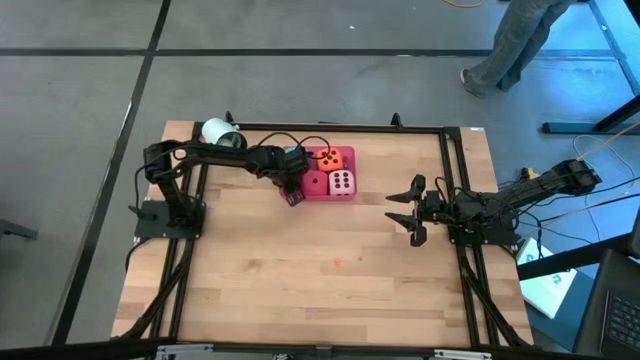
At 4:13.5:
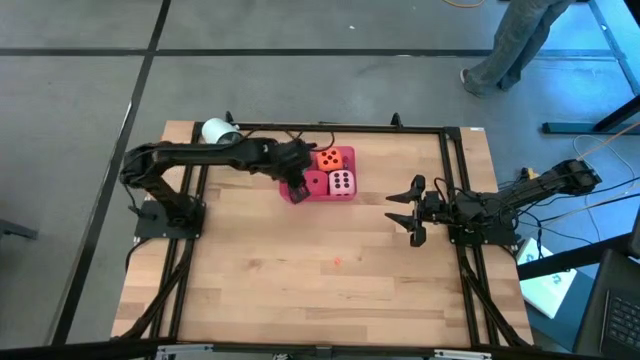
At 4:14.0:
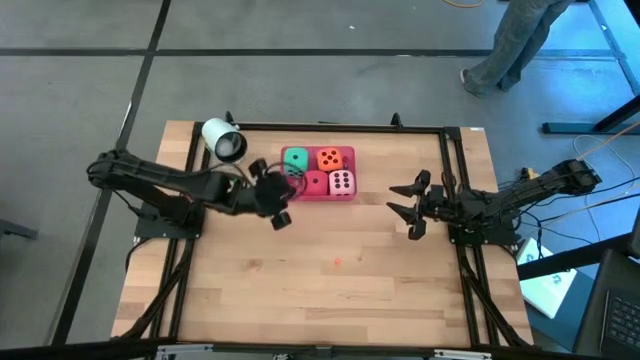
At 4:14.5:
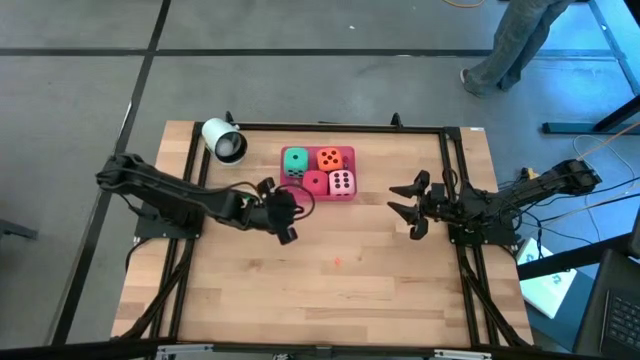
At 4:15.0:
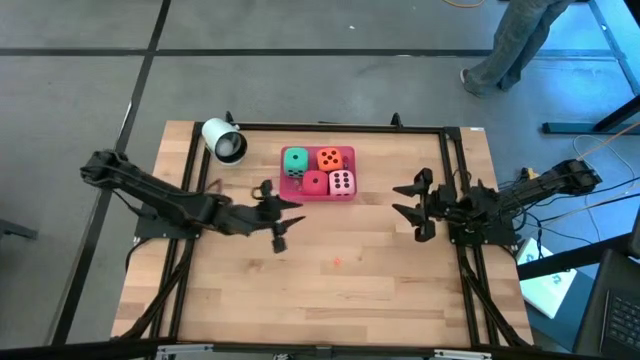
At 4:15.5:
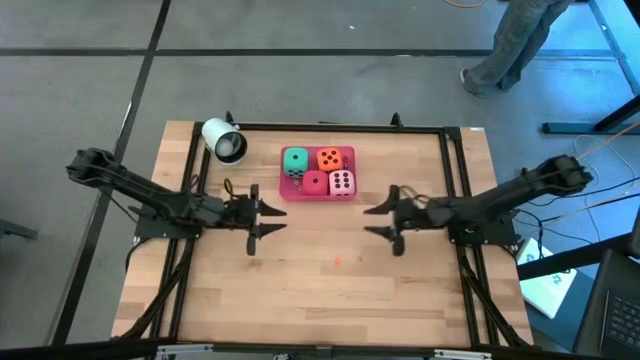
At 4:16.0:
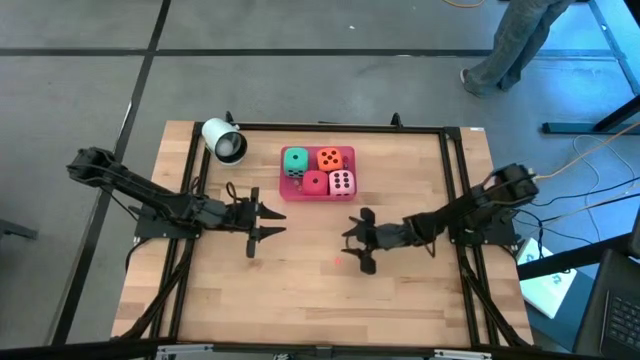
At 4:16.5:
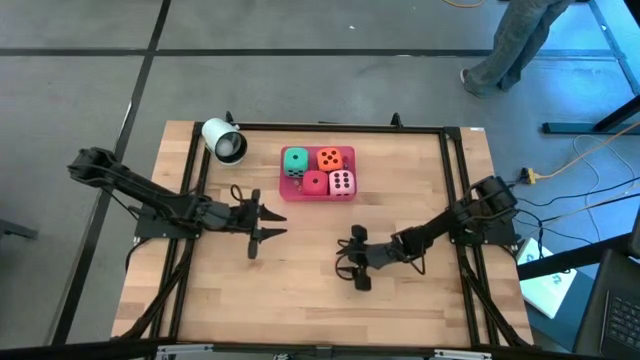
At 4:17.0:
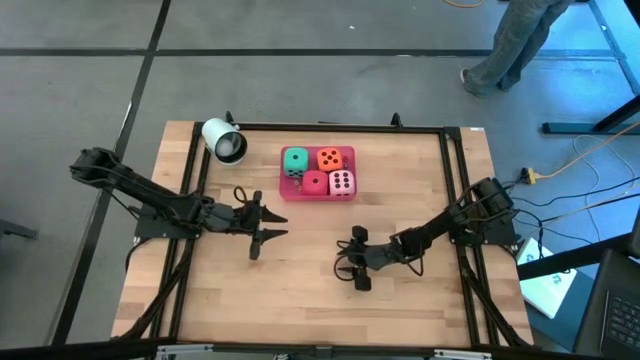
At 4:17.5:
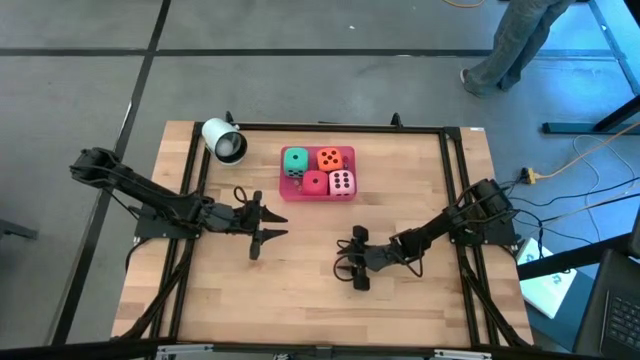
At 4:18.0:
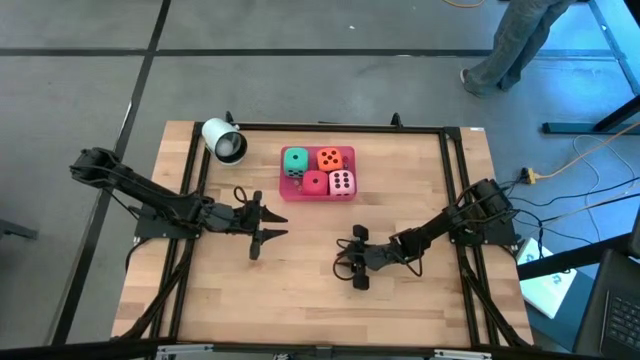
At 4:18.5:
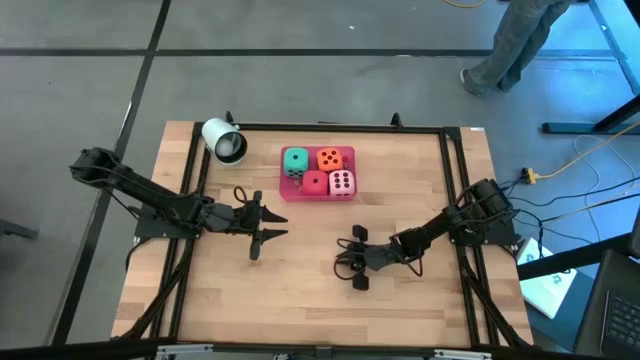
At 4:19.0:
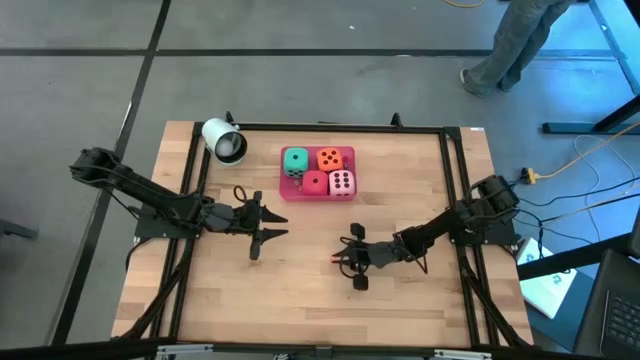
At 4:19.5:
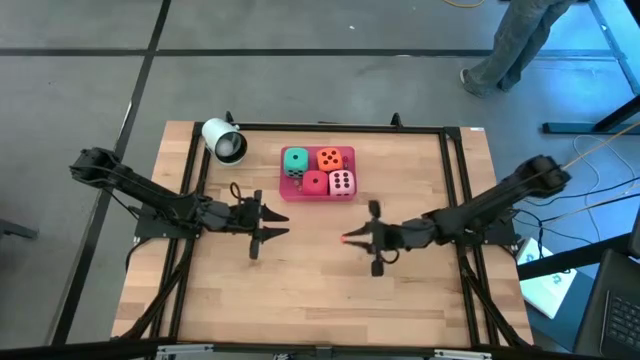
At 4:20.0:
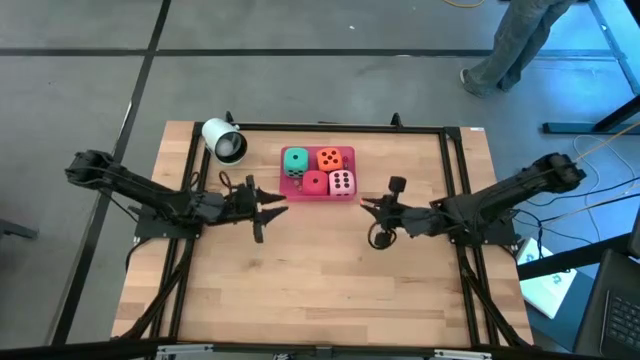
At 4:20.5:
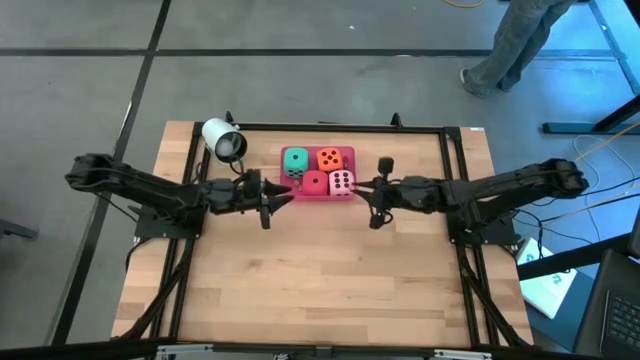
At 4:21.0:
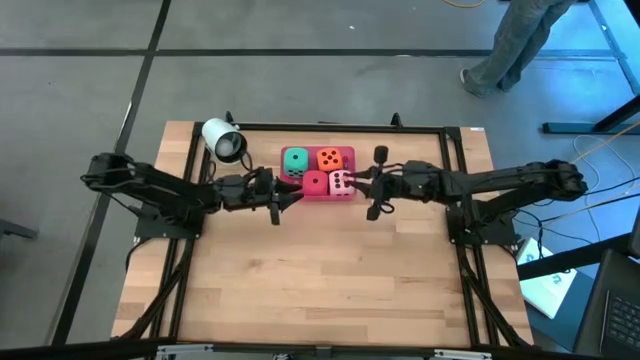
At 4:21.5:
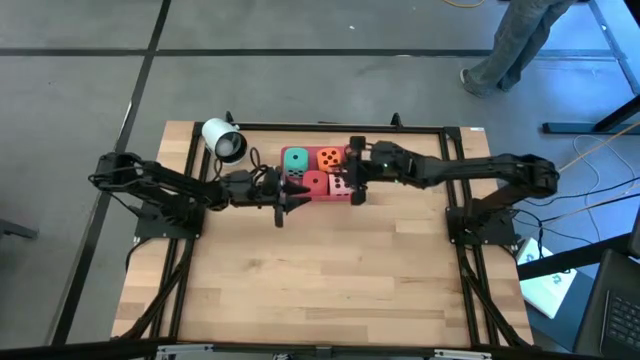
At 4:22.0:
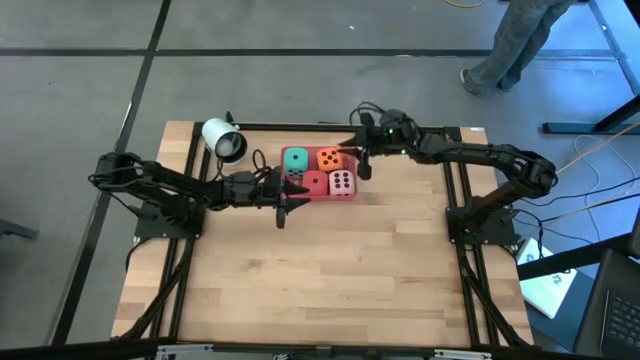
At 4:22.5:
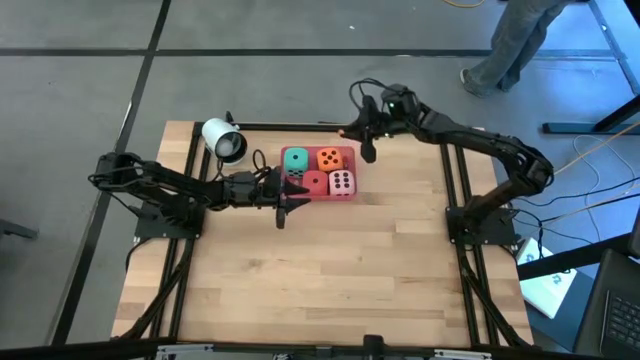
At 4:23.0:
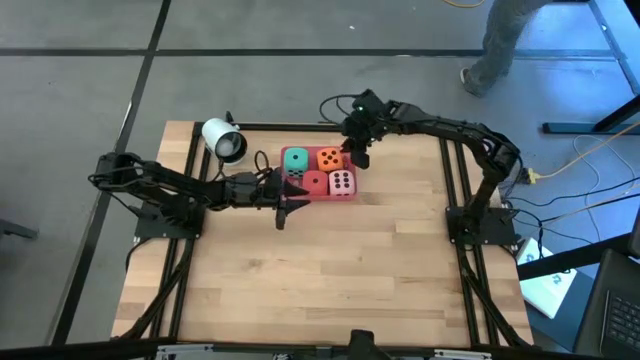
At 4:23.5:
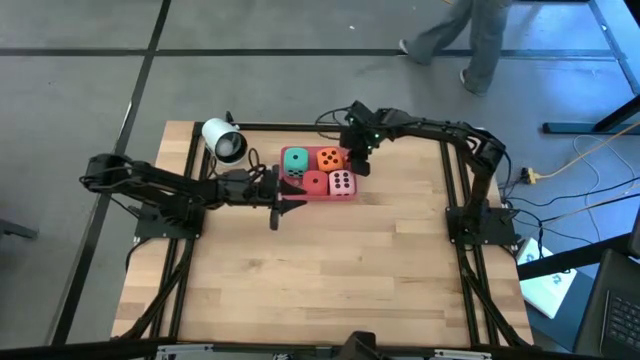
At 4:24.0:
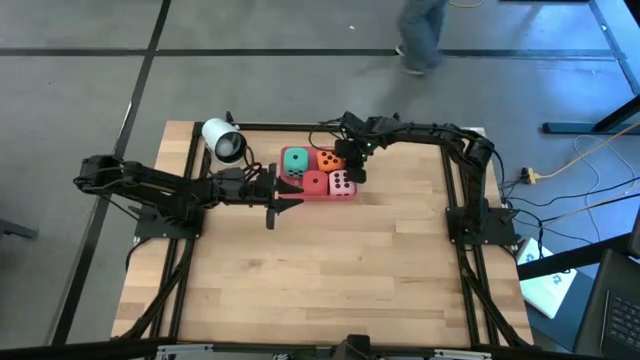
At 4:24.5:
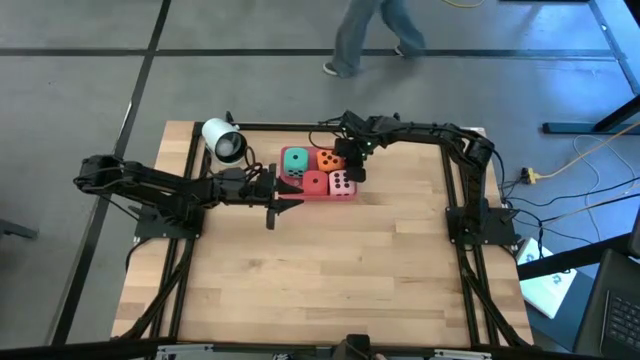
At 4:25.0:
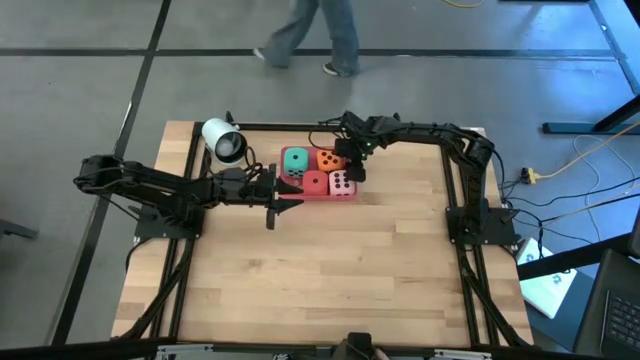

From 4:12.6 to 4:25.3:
Task: Pick & Place Dice
Put the small orange dice into the pink bin

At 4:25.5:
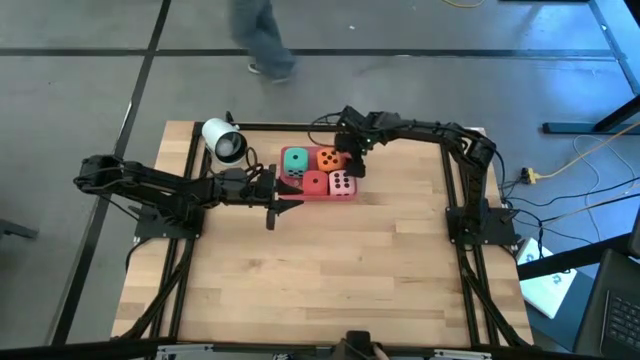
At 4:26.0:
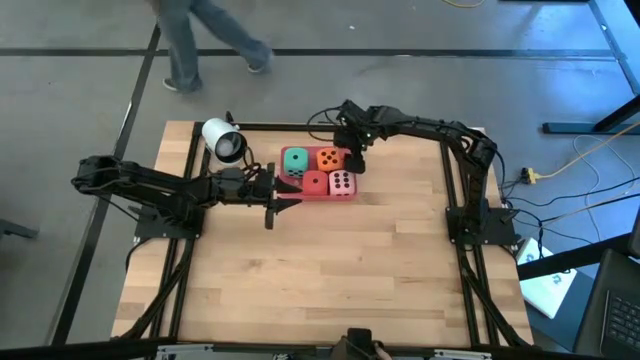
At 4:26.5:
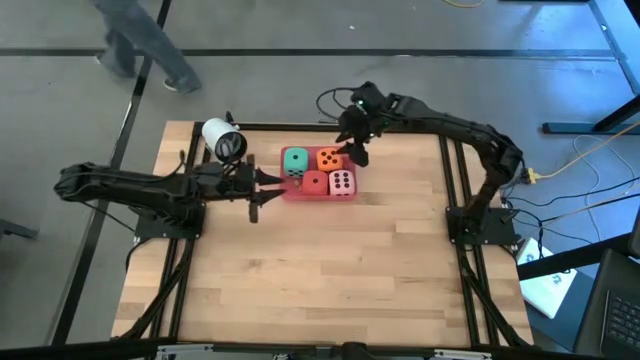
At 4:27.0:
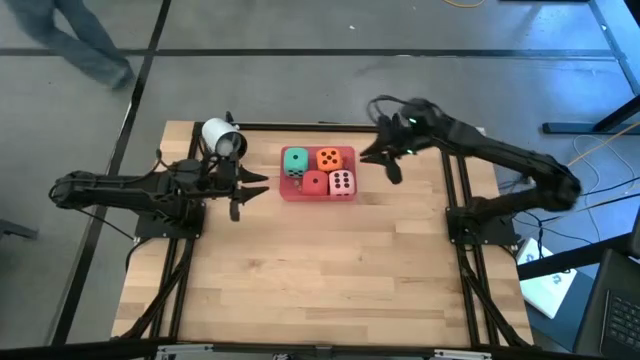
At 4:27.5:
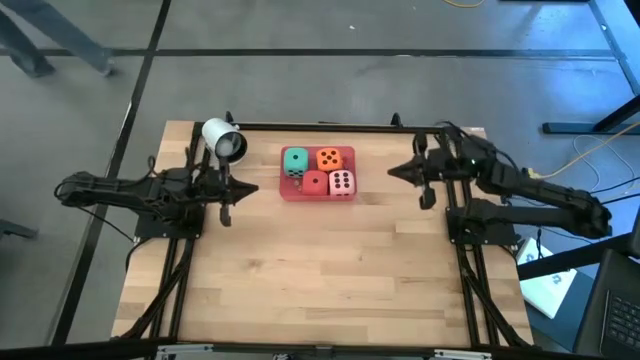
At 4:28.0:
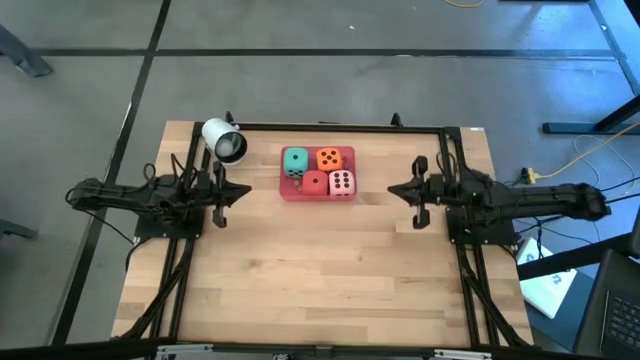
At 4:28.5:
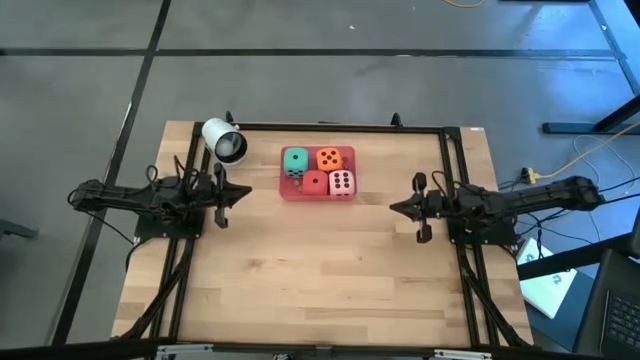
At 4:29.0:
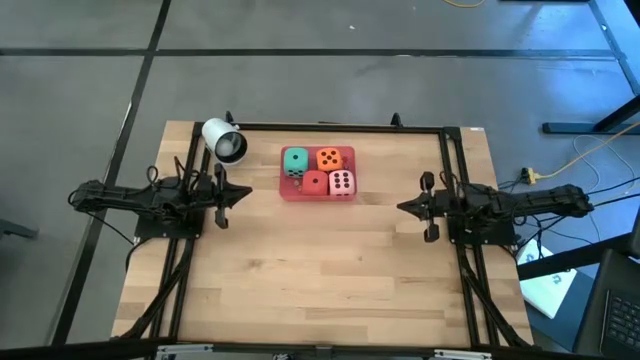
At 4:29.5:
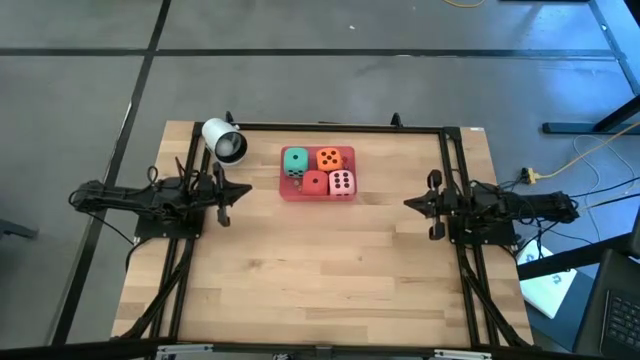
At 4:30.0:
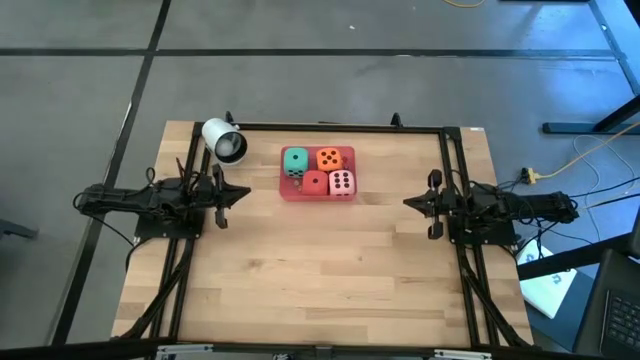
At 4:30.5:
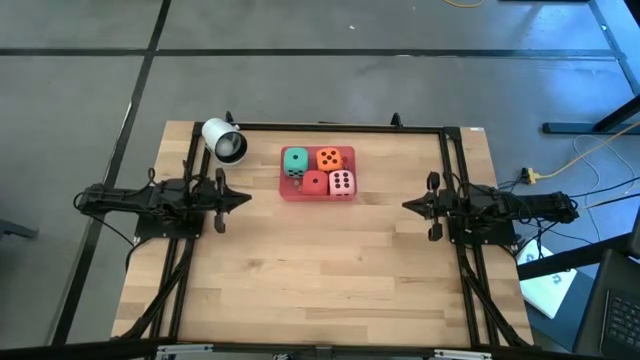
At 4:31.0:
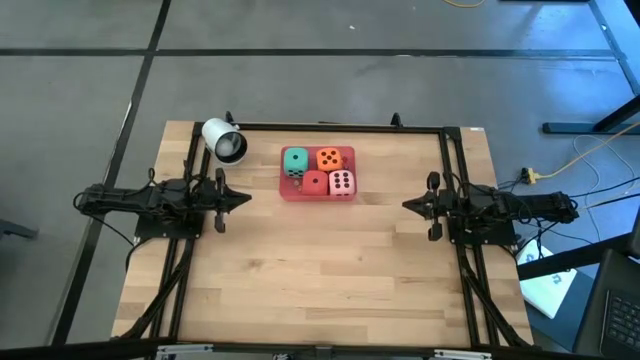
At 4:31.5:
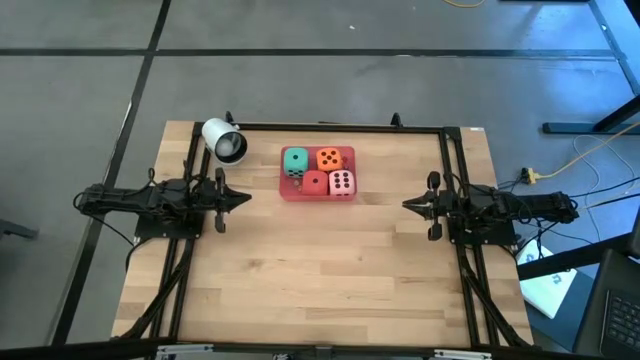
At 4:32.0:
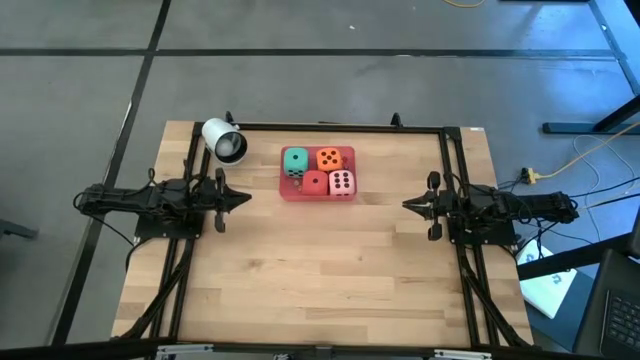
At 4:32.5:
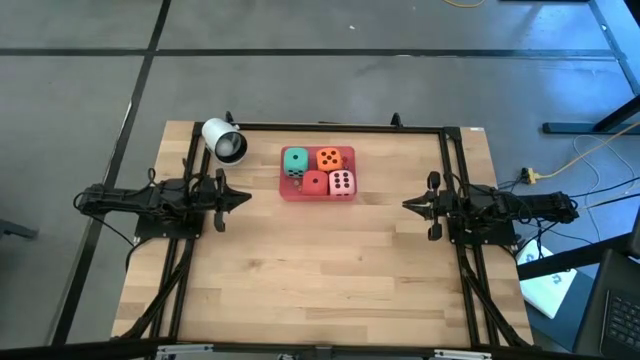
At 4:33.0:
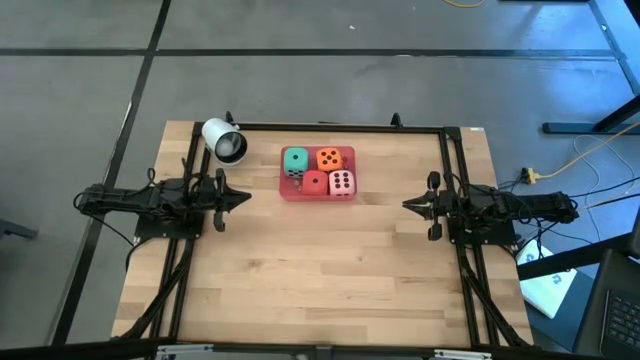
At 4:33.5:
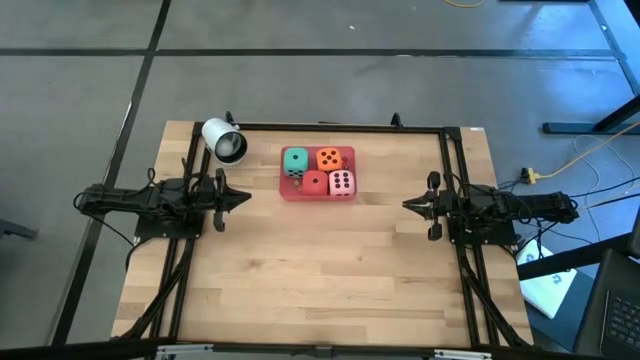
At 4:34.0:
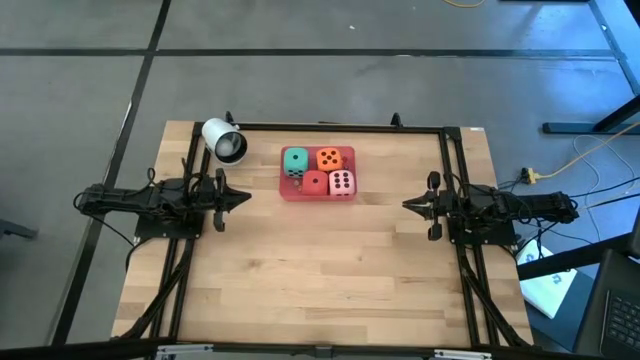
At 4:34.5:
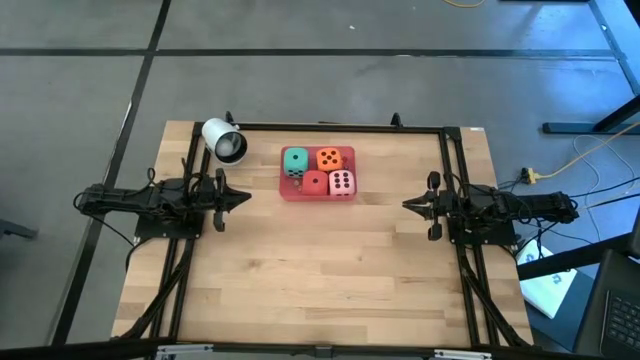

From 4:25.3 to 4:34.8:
Return to Home Position
